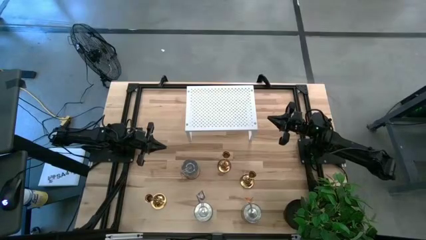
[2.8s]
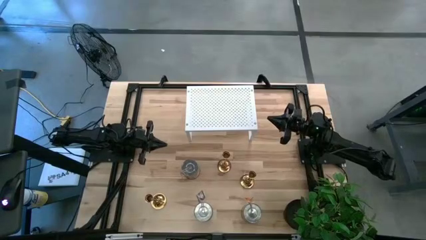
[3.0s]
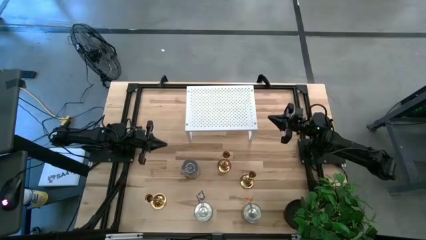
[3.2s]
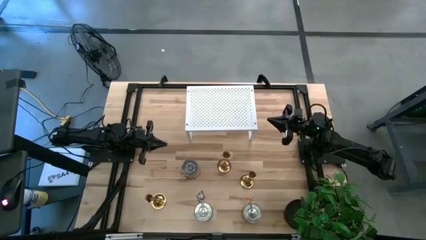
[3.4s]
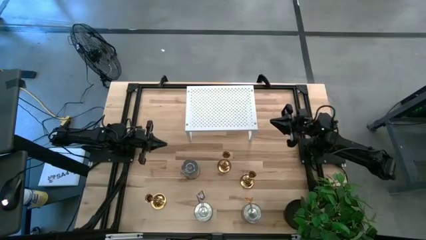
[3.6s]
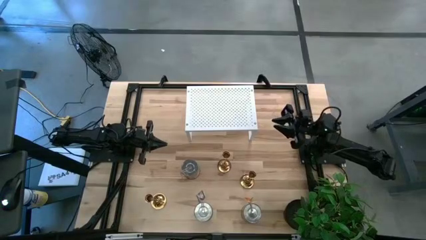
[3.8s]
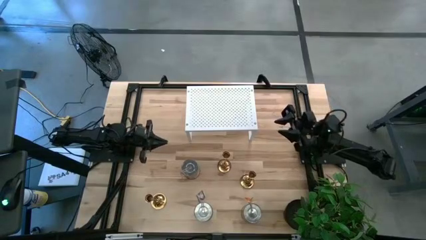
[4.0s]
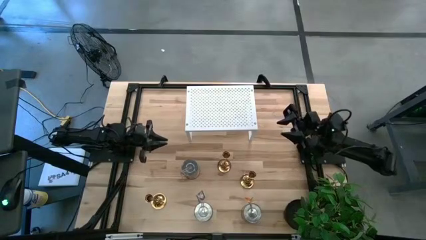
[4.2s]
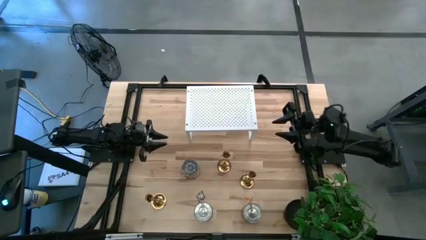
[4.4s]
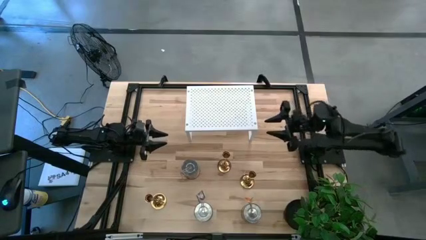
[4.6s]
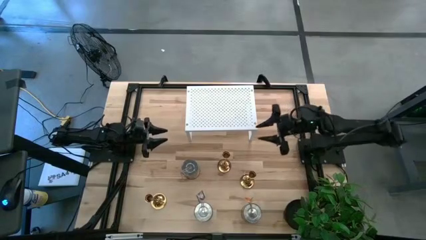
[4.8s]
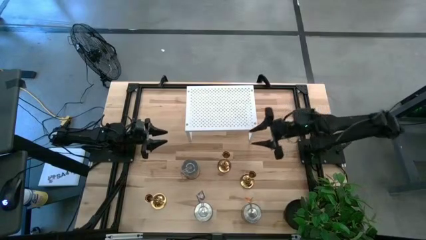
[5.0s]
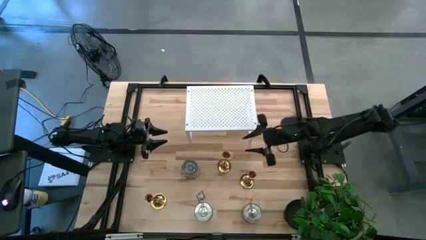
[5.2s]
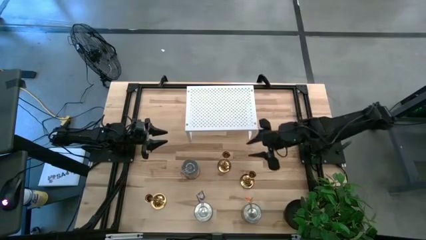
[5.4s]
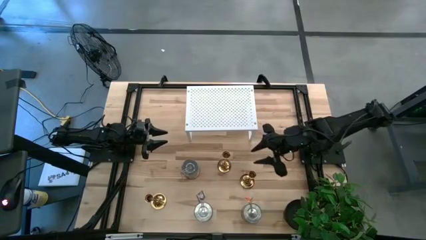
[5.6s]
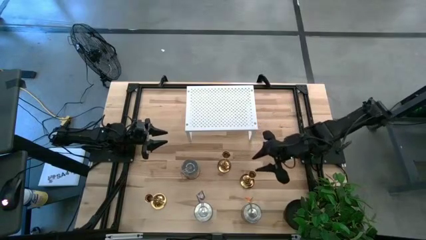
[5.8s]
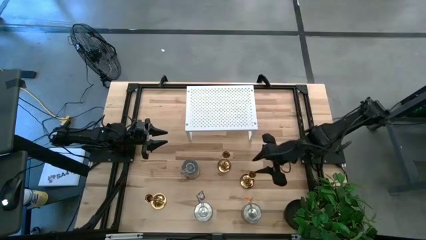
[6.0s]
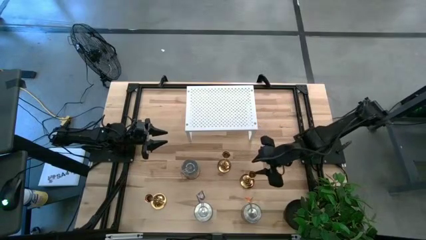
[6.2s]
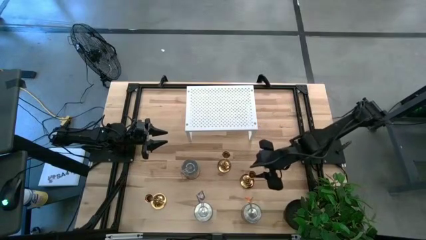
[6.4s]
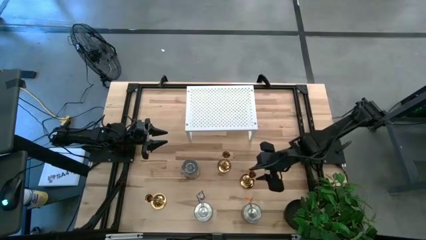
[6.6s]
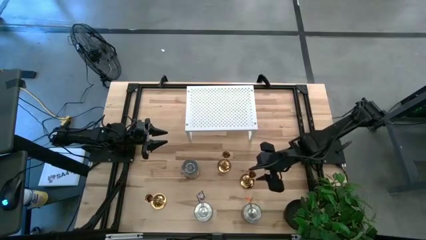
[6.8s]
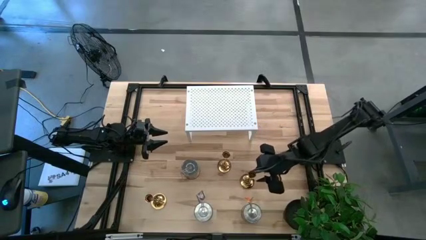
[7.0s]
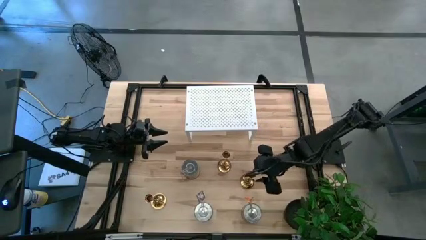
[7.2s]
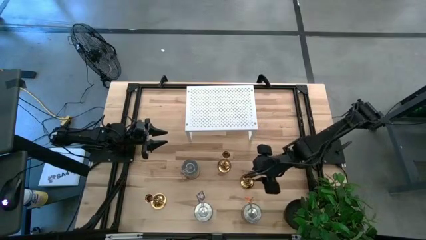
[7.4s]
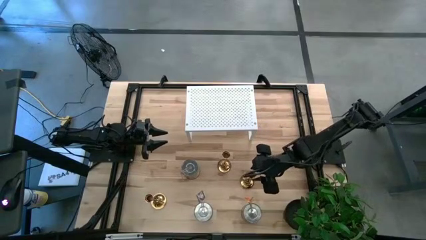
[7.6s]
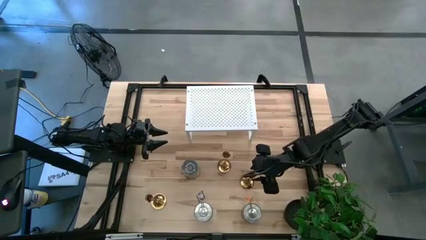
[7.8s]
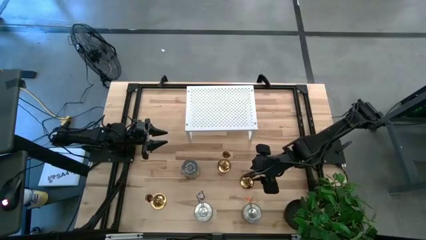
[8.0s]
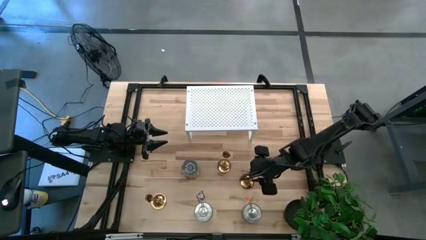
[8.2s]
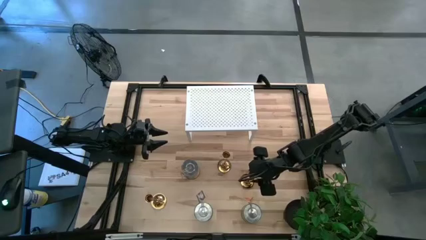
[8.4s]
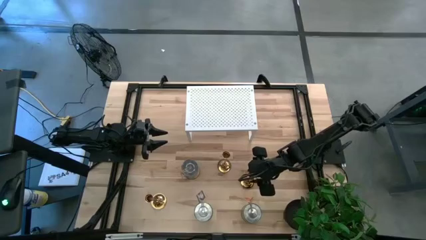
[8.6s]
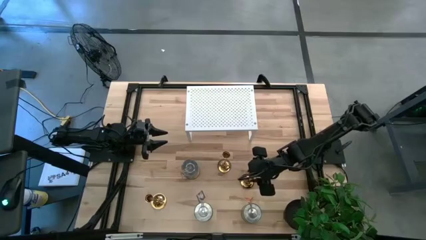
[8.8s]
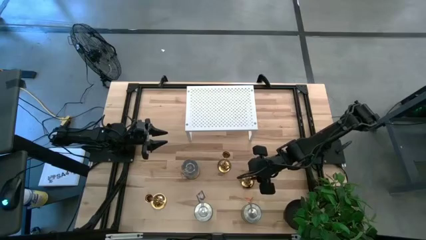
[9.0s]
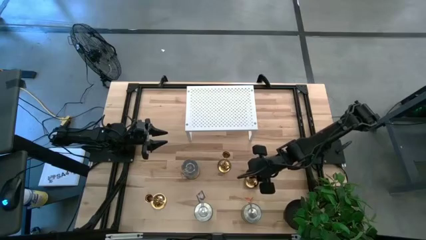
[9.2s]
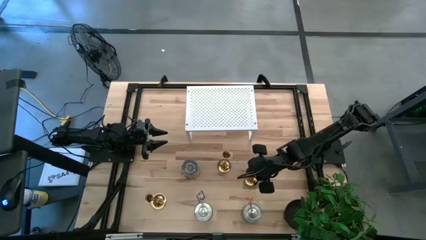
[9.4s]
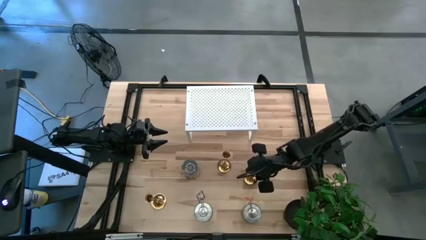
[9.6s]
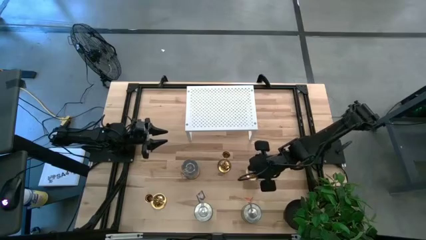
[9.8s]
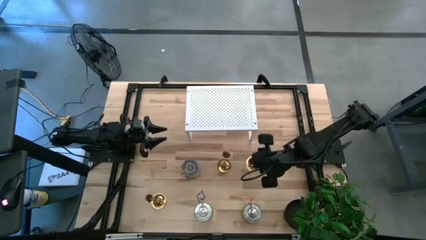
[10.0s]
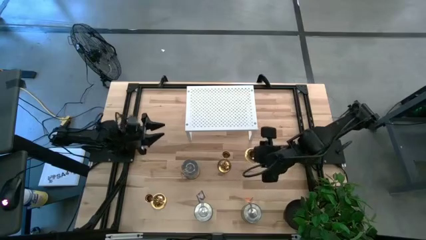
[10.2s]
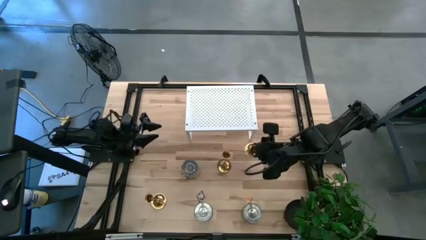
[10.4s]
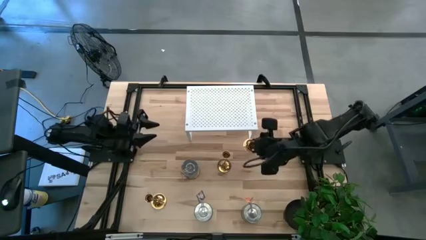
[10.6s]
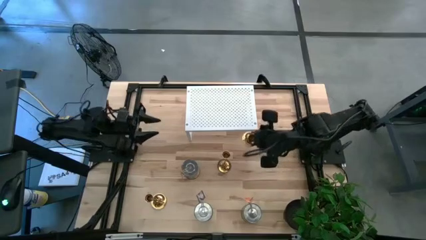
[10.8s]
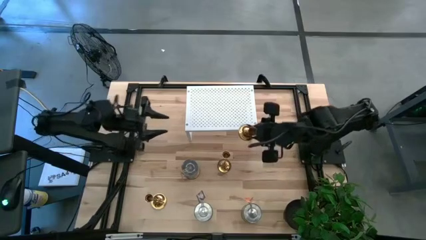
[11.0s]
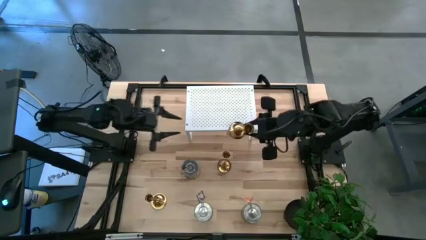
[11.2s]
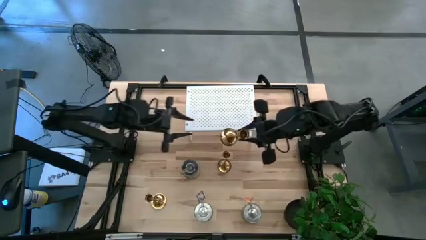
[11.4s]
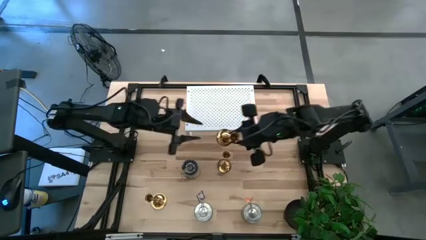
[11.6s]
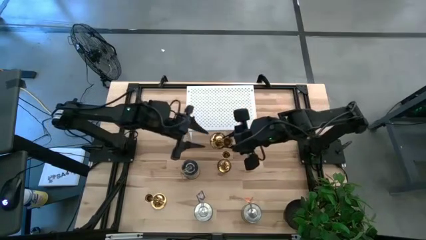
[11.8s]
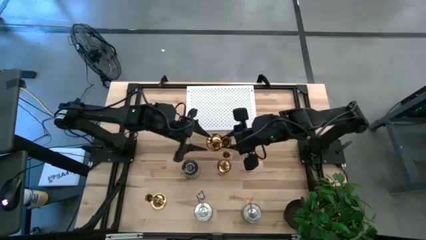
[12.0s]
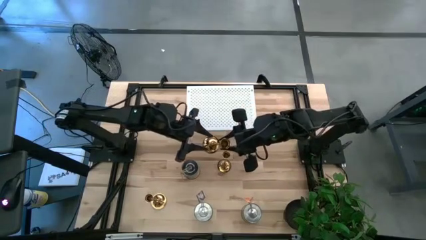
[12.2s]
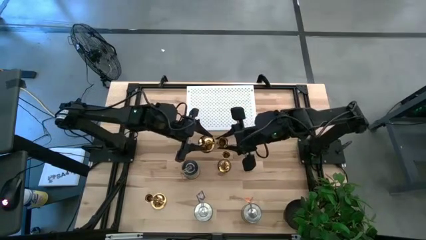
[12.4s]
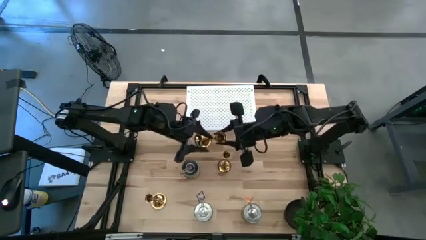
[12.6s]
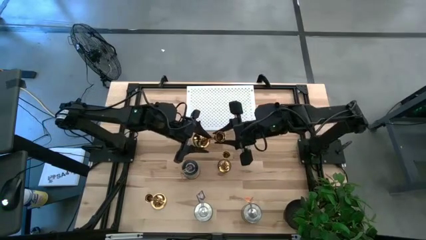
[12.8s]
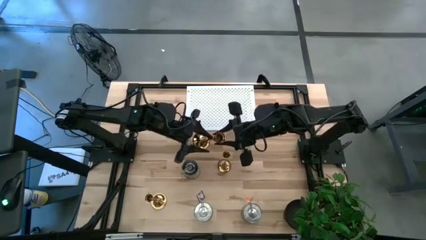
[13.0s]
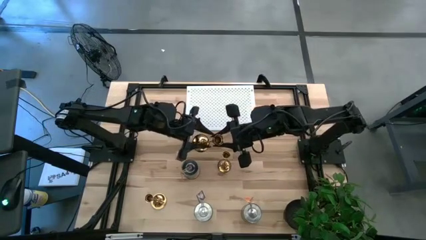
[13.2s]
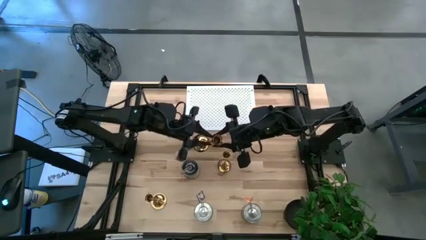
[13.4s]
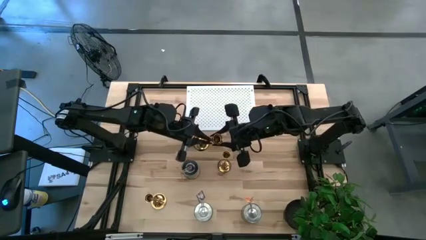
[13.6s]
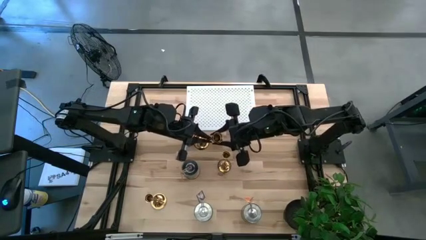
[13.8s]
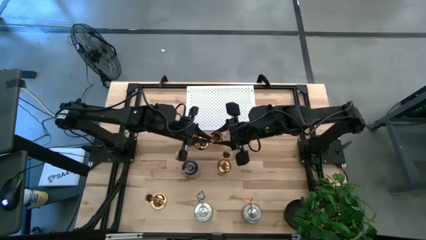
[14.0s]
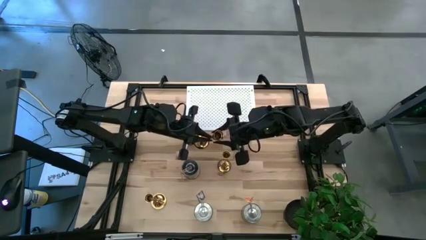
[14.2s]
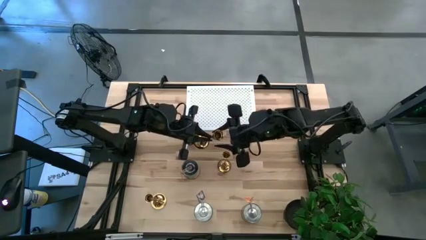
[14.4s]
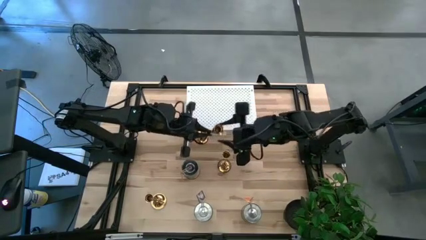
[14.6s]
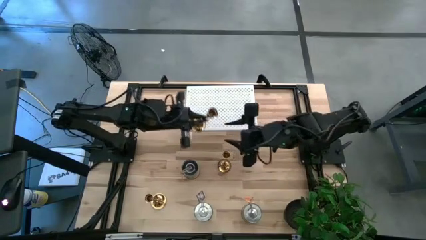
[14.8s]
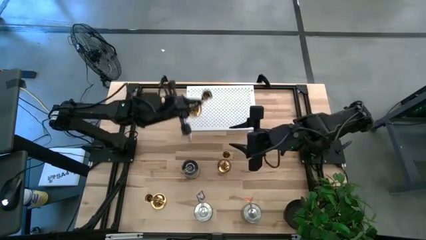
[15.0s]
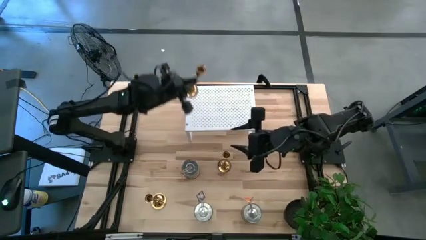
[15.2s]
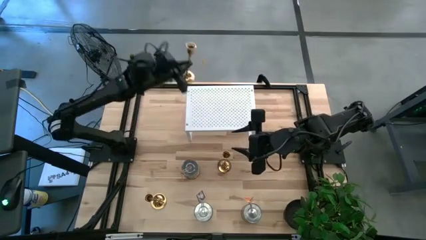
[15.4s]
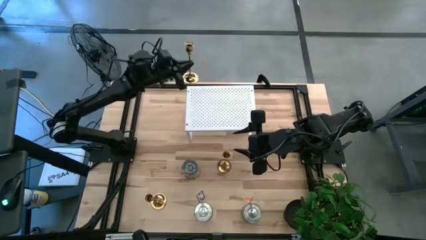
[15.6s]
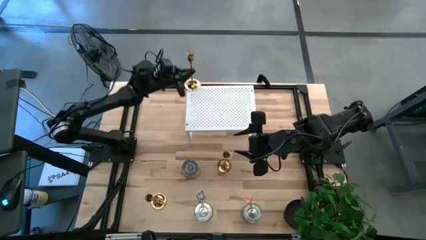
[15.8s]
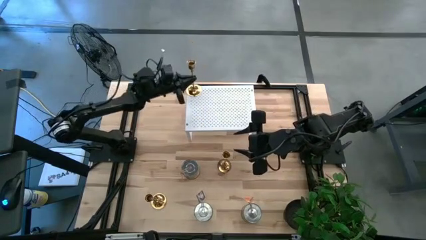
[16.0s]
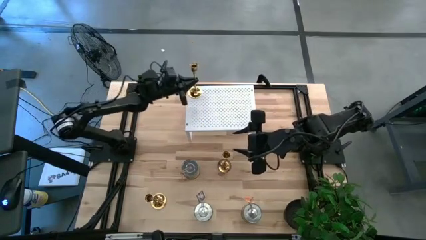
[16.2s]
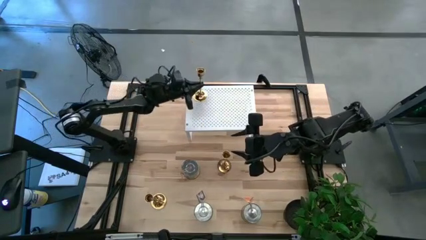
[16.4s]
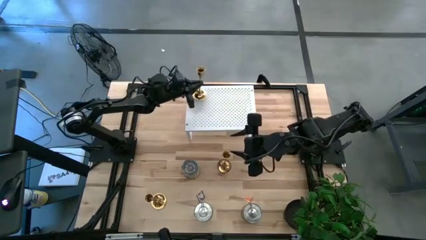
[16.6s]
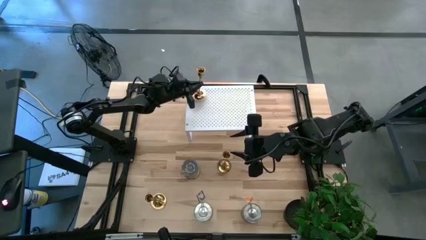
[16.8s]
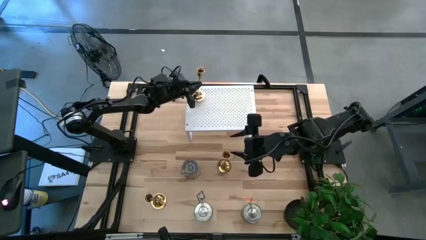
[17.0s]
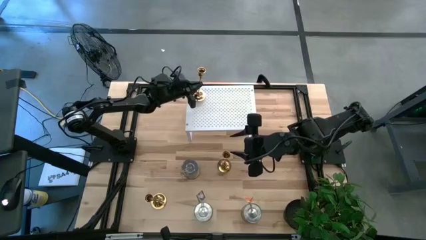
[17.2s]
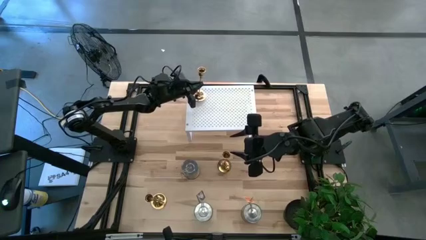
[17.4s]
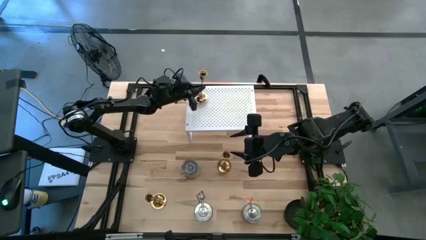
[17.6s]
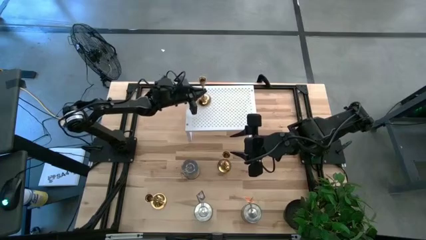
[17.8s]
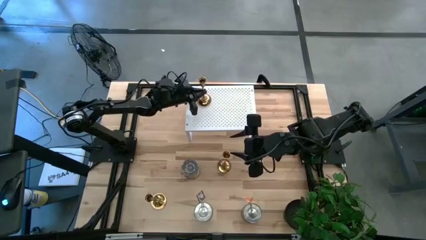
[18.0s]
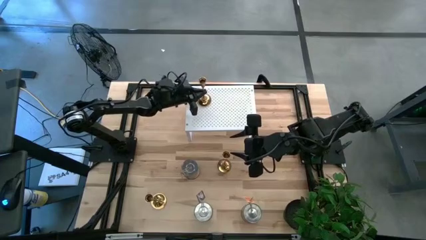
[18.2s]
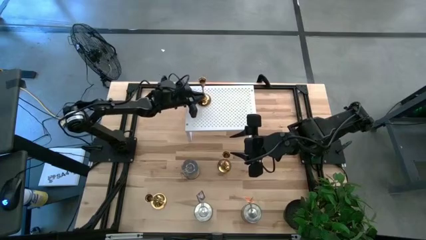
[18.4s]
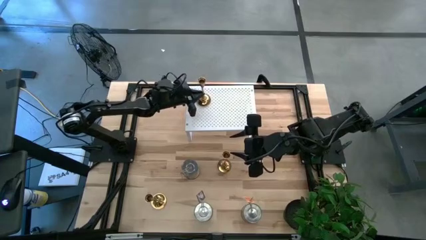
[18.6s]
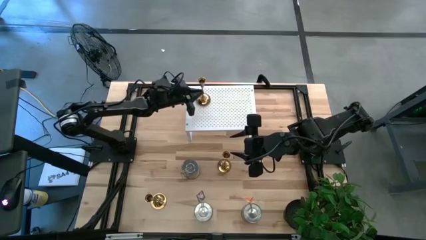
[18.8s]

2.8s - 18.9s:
Task: Pick & Place candle stick holders
Put the middle right gold candle holder on the shelf
